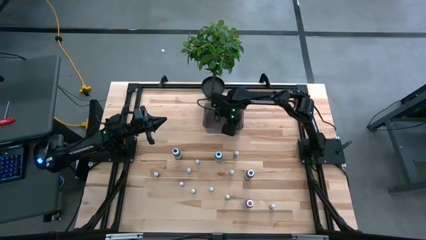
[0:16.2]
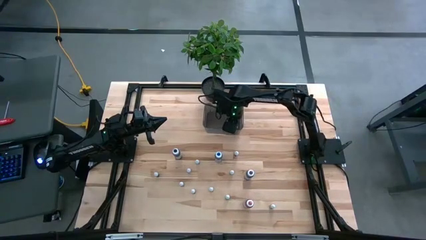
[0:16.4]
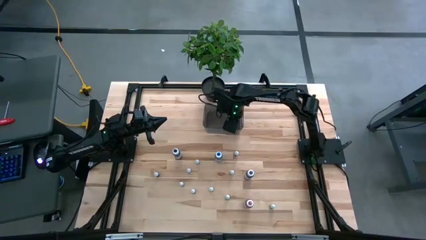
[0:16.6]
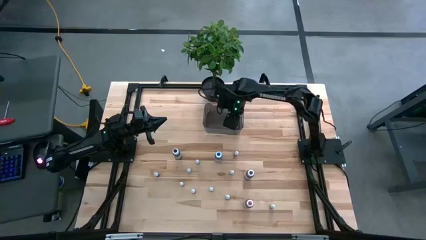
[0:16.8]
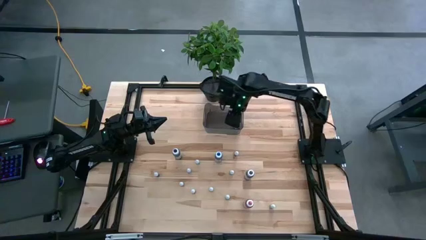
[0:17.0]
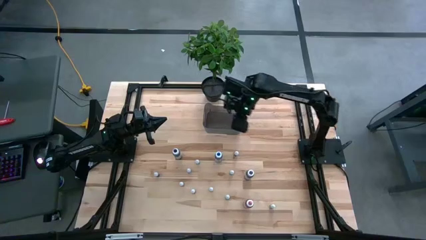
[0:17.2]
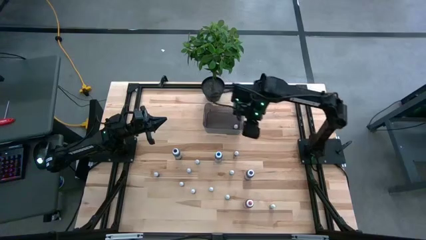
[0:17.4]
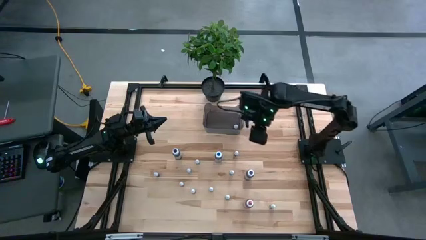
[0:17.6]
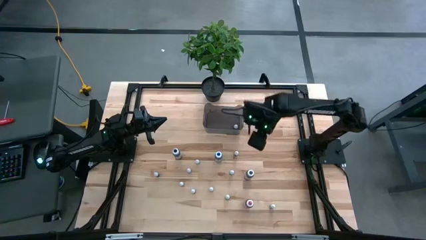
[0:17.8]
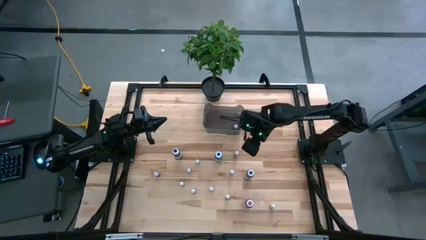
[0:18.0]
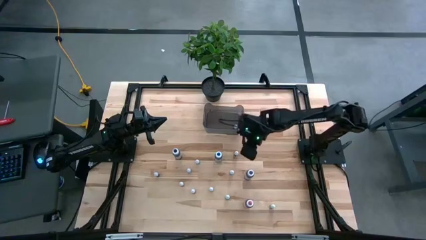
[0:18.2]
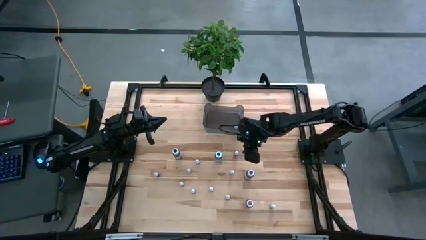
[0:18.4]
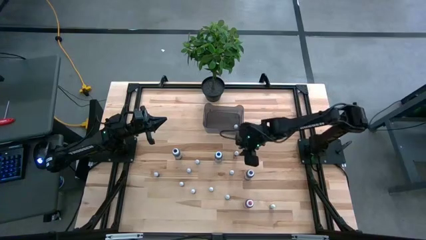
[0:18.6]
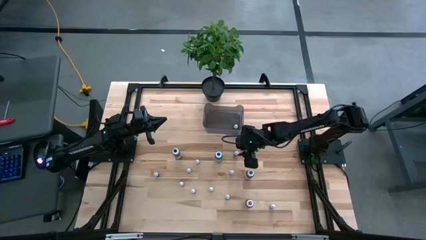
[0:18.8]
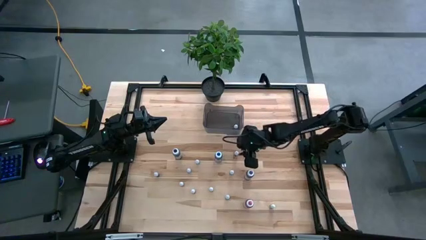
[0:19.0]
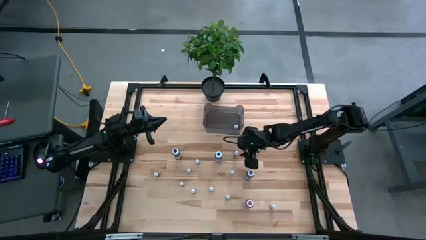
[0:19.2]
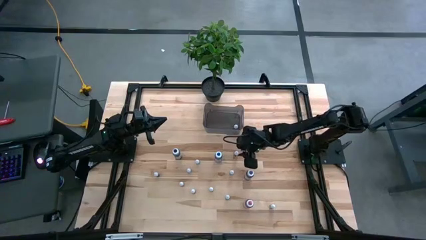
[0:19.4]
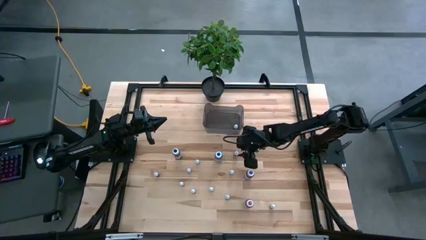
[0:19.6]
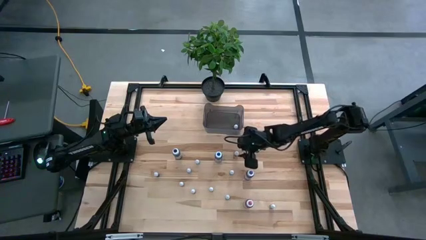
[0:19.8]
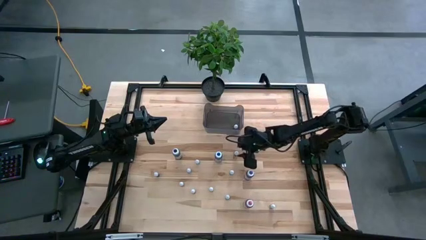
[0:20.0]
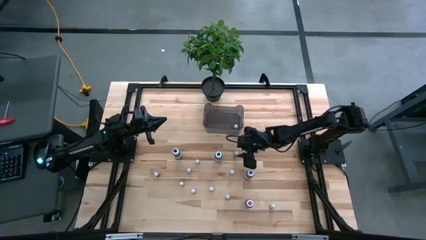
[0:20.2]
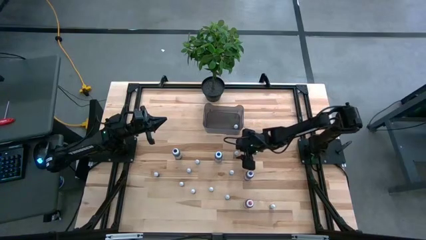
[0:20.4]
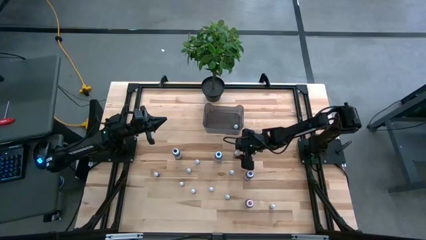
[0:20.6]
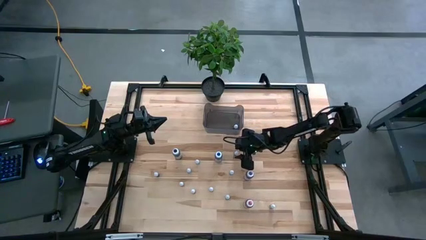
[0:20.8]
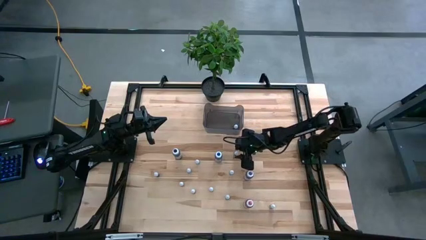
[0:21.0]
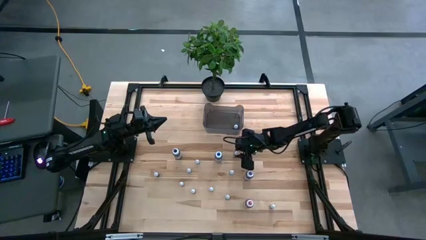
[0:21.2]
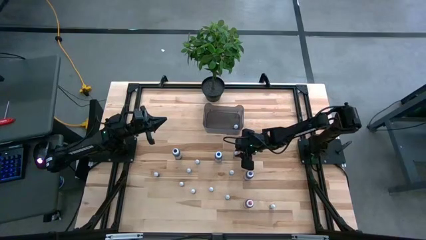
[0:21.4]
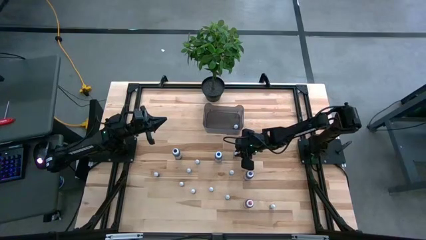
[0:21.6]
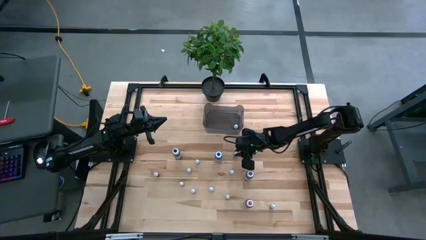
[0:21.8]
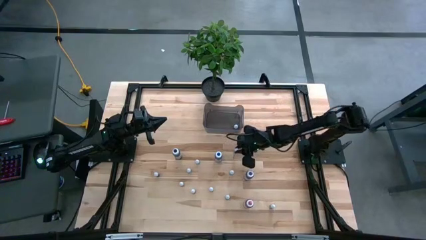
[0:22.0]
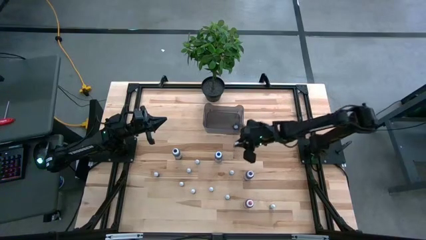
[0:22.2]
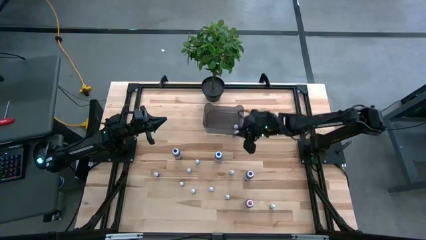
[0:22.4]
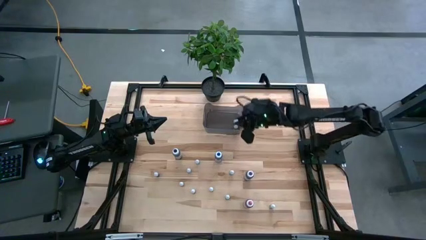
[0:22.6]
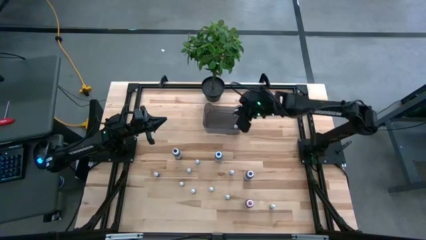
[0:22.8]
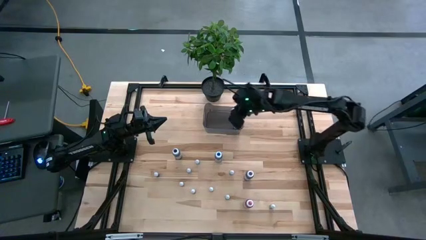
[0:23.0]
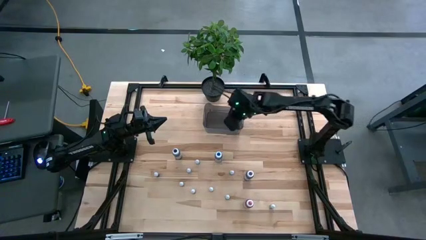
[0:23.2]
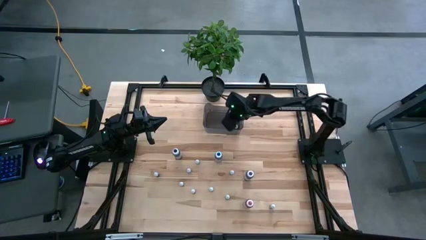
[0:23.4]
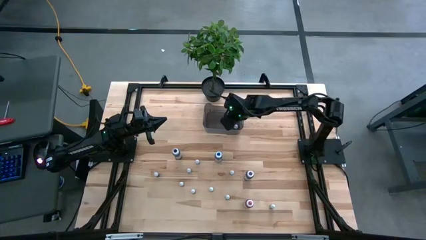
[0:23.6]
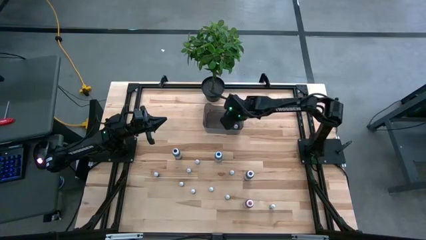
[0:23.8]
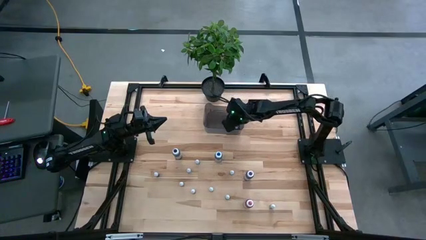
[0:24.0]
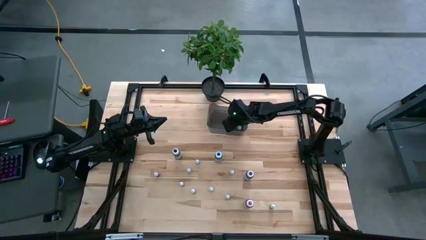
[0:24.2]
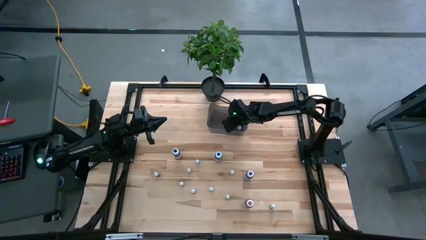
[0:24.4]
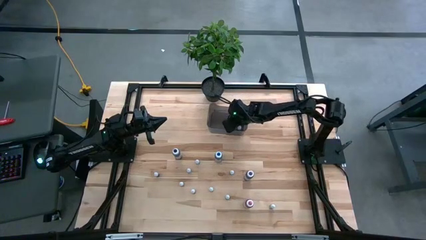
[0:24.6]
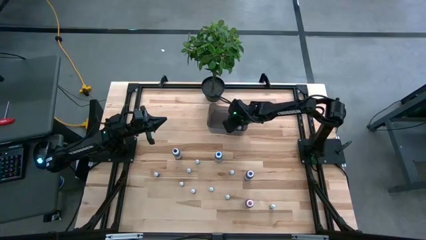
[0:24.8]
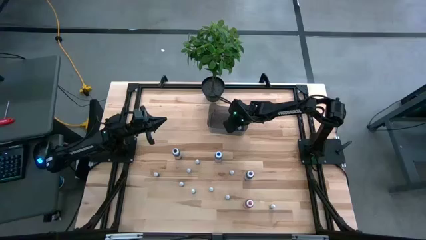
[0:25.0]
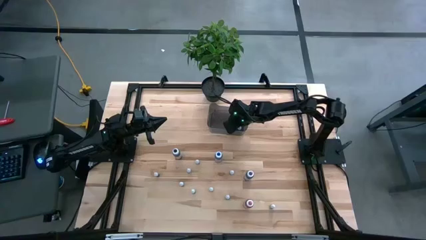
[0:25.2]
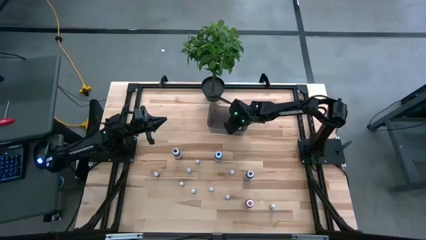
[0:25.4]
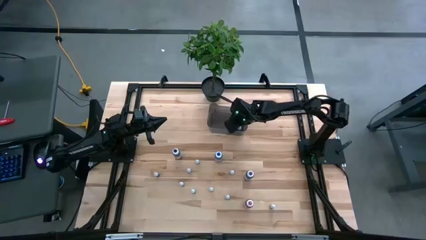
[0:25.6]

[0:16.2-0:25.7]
Task: Pick & Place food coloring
Put the small purple food coloring bottle into the black bin

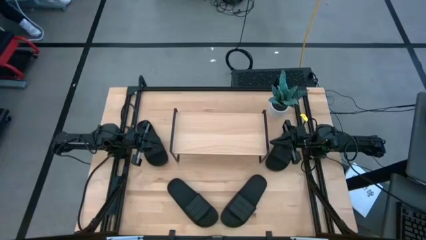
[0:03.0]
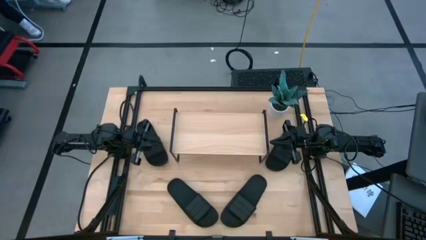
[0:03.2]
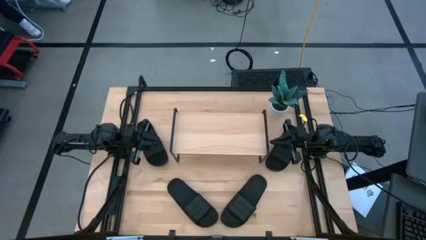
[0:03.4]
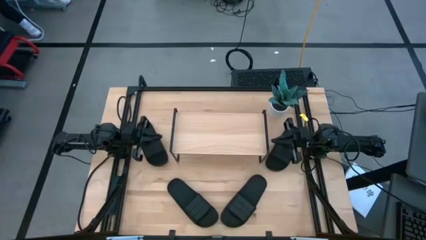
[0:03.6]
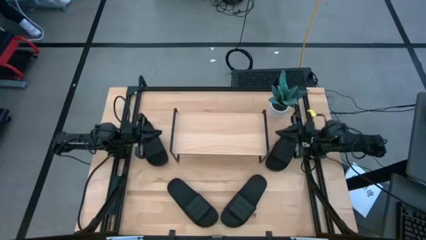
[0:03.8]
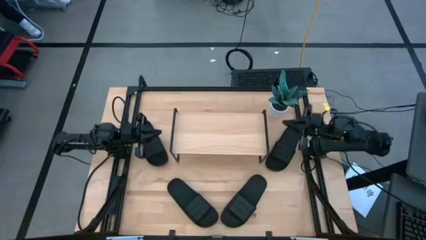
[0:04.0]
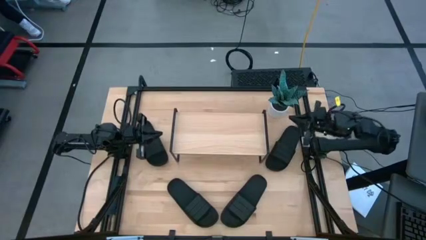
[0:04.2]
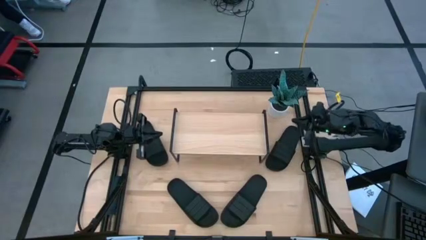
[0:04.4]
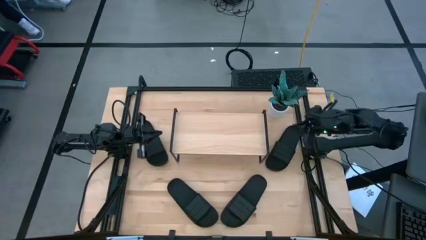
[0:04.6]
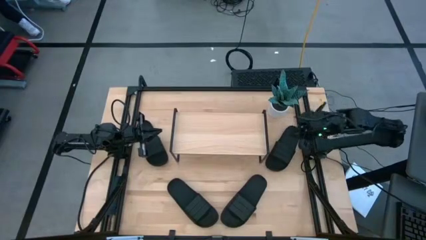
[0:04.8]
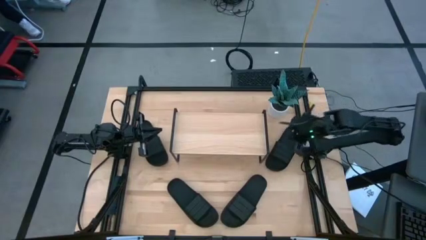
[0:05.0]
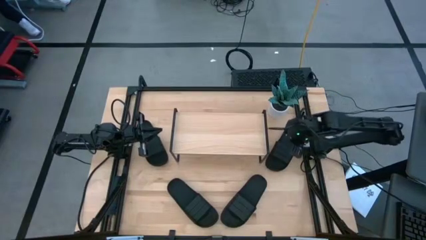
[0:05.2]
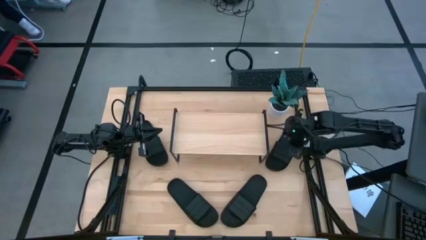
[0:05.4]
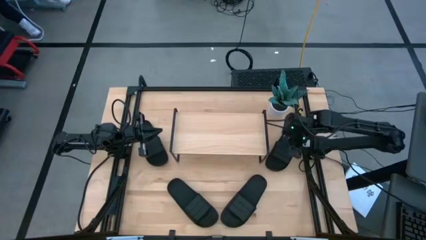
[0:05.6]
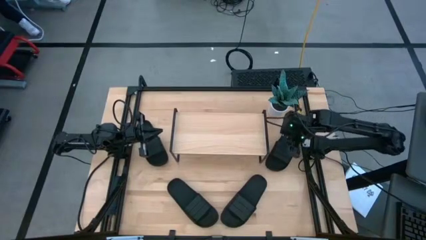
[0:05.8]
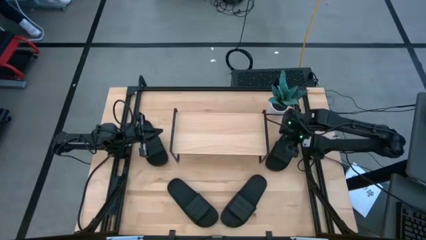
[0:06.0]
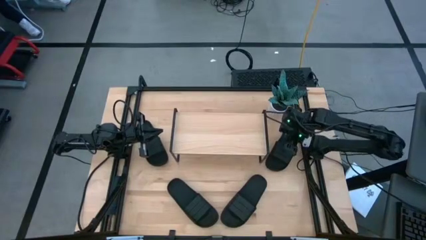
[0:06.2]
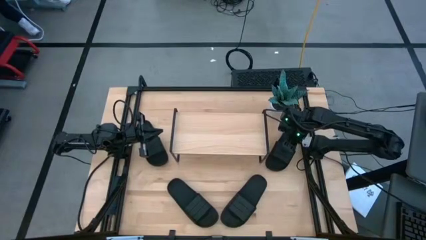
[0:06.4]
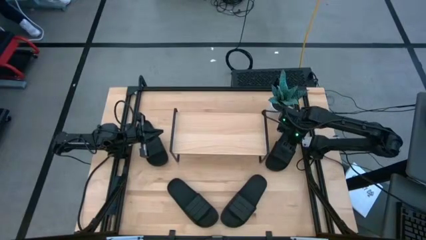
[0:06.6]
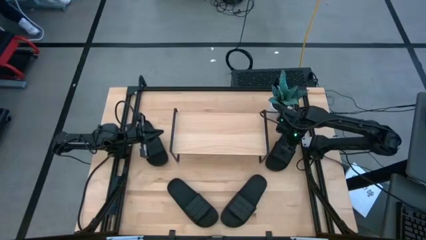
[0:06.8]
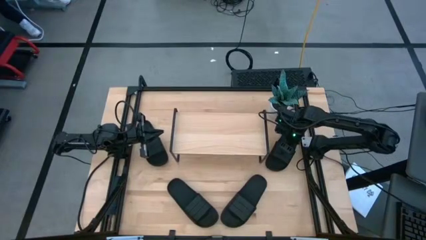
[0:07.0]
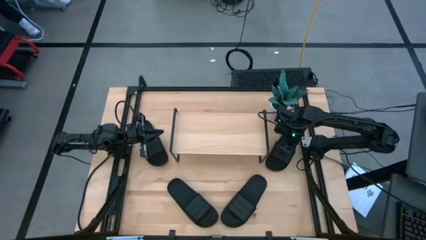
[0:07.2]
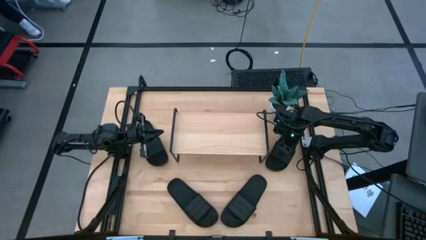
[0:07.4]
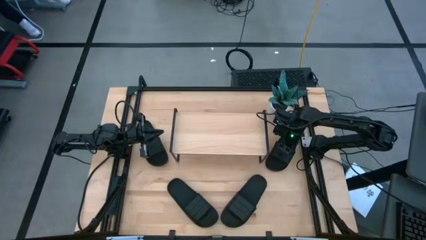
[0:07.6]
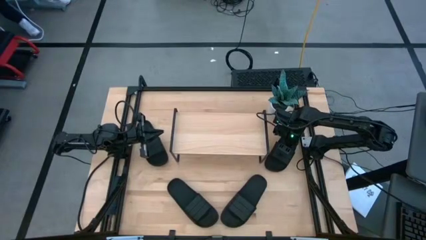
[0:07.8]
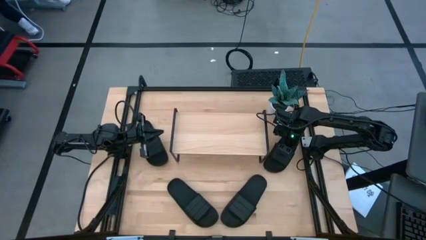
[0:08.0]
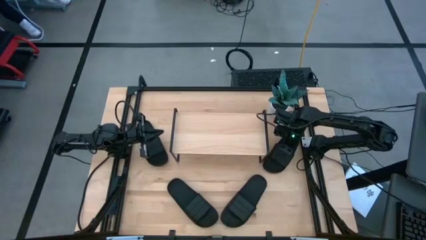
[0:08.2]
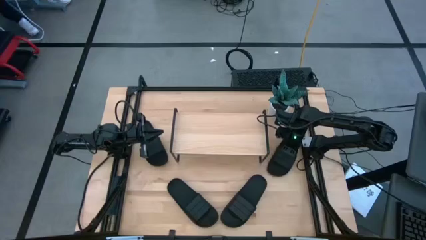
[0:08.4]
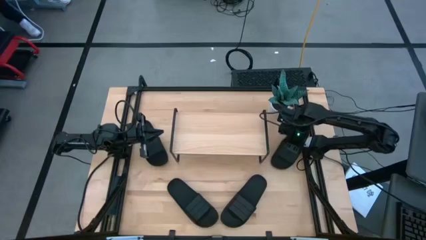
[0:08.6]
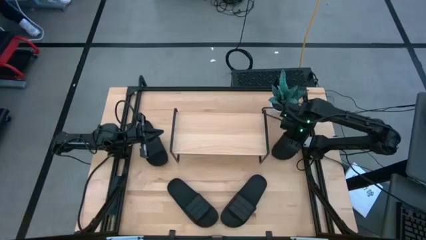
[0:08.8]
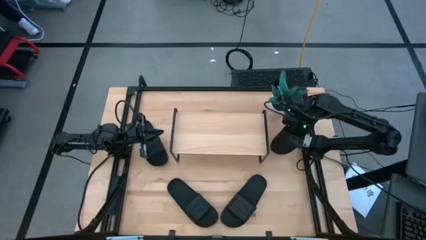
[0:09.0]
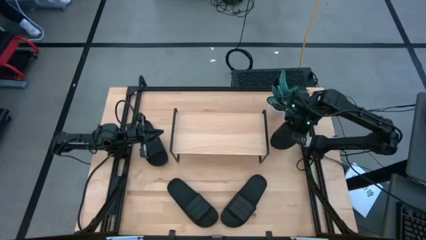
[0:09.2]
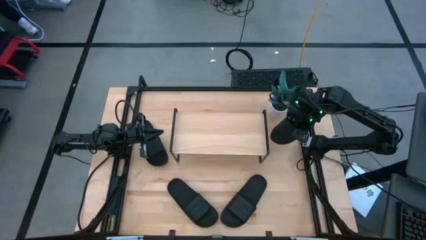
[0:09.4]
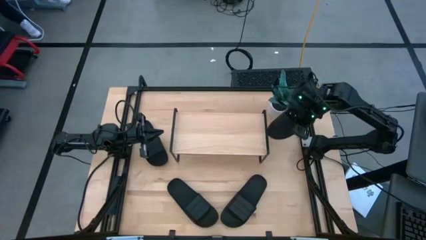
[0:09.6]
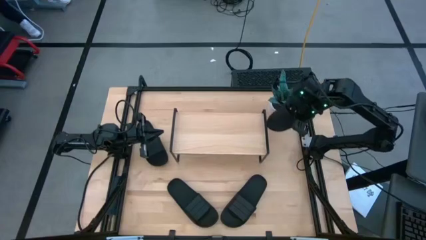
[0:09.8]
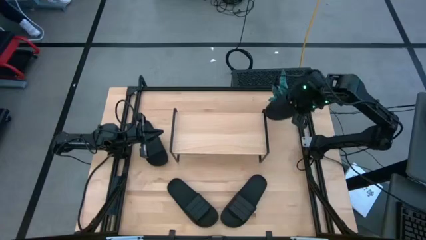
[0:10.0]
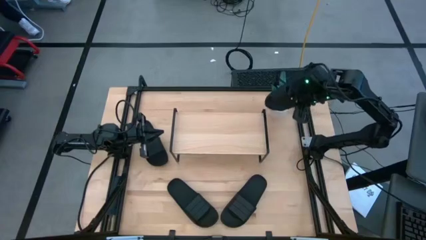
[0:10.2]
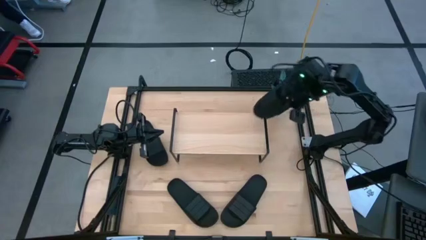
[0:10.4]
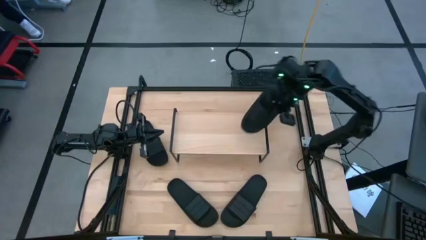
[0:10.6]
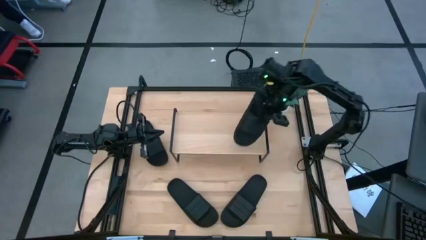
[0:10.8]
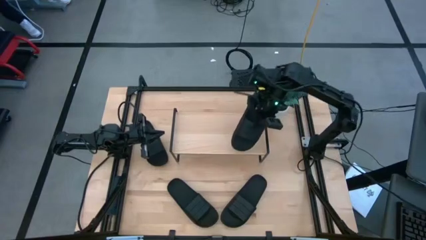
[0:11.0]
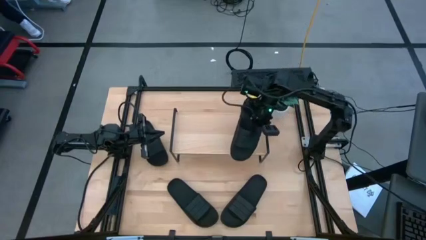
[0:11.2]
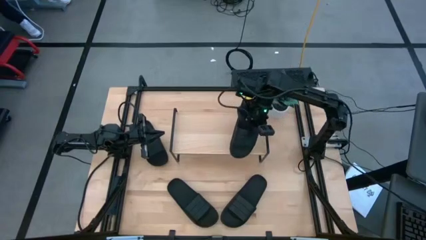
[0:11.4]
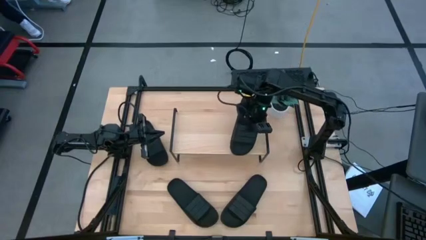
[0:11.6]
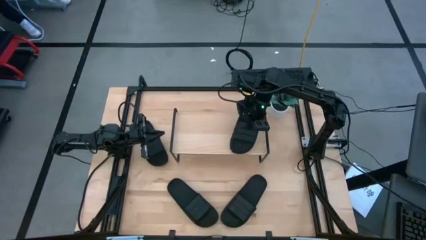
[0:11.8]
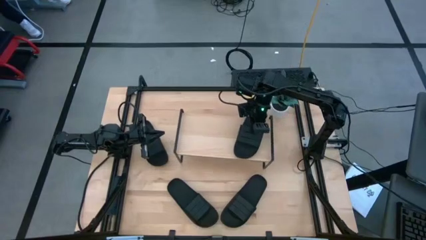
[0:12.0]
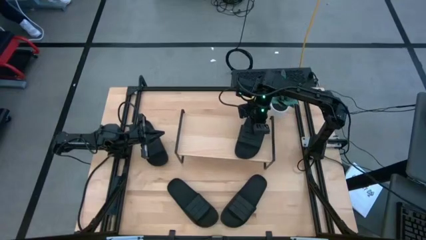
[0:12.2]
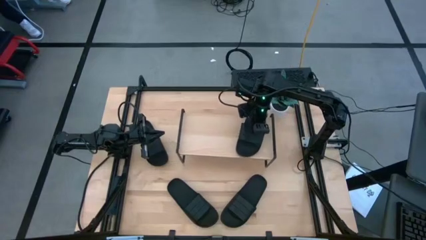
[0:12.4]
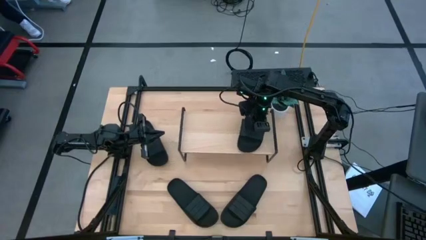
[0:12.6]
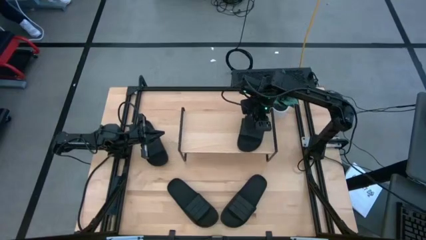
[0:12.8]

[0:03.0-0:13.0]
Task: Pick and place slides into the shelf
Put the black slide on the shelf
